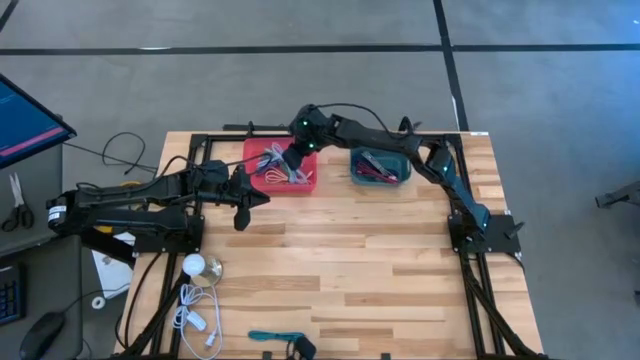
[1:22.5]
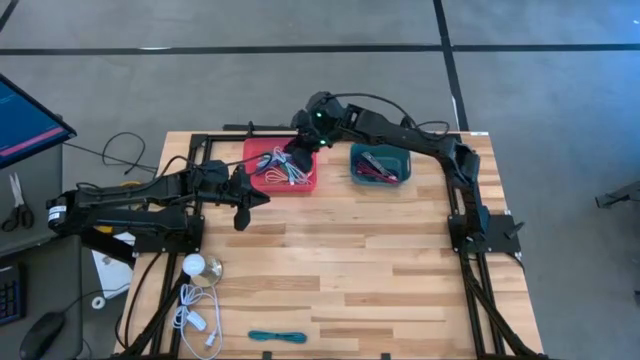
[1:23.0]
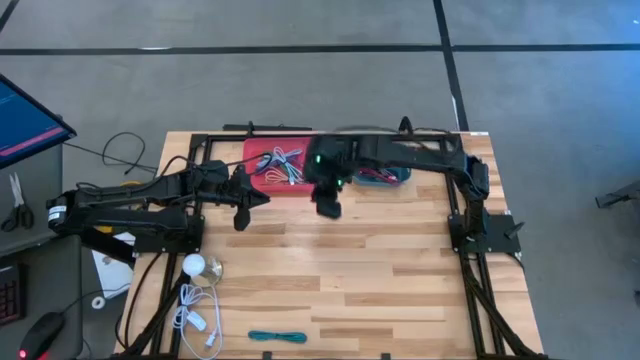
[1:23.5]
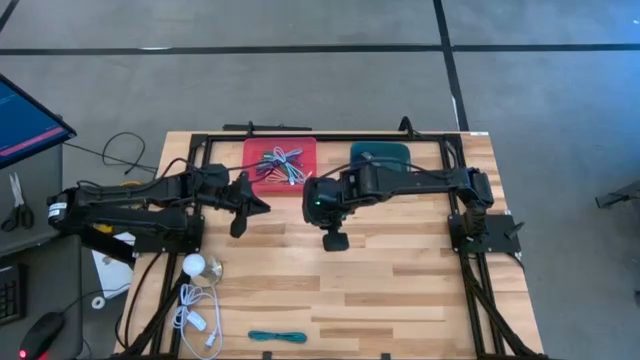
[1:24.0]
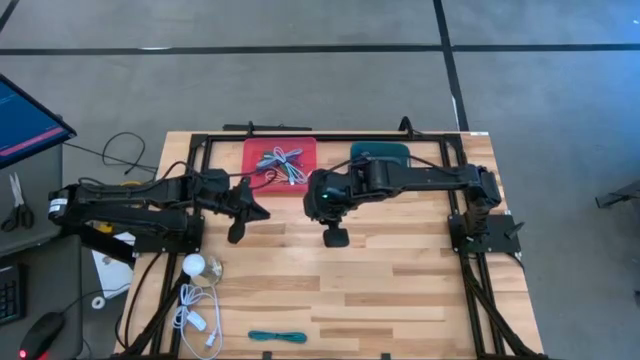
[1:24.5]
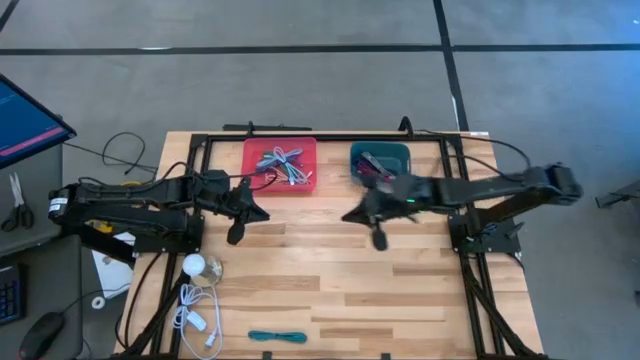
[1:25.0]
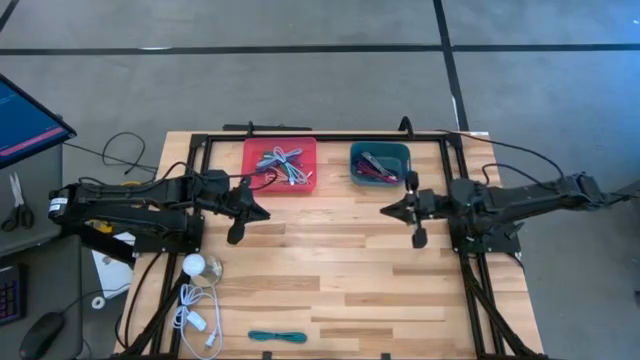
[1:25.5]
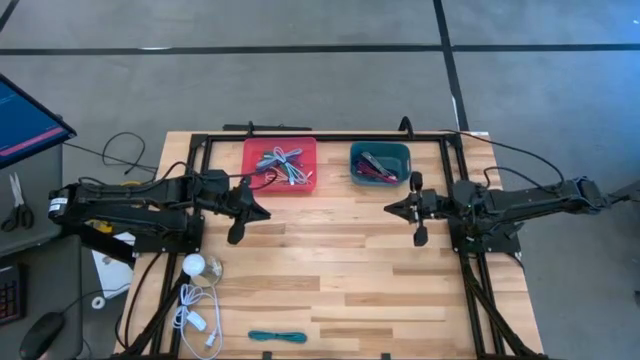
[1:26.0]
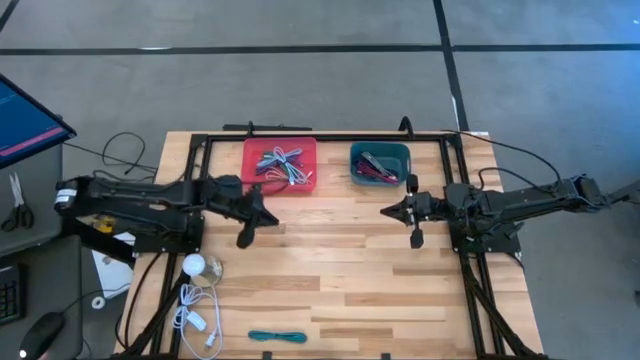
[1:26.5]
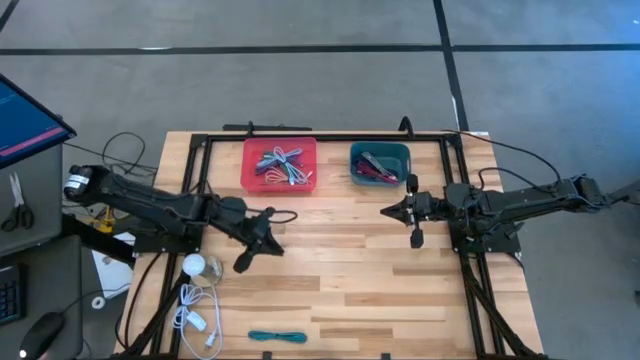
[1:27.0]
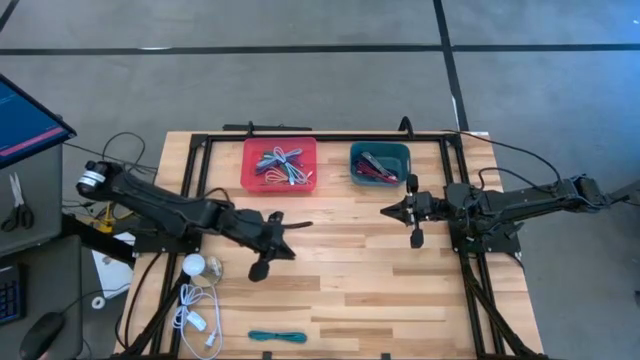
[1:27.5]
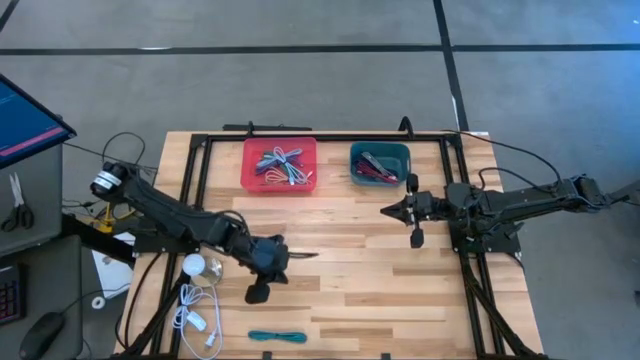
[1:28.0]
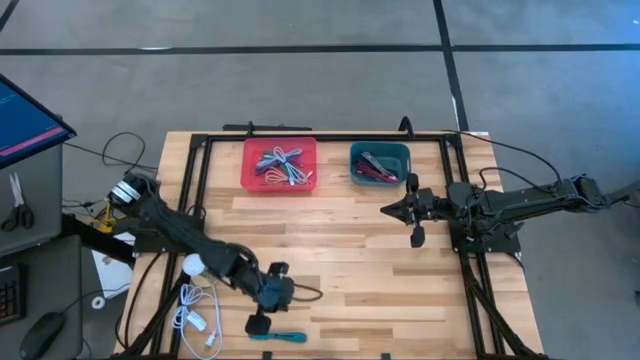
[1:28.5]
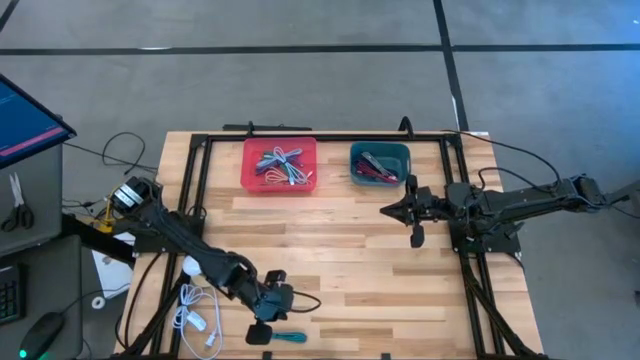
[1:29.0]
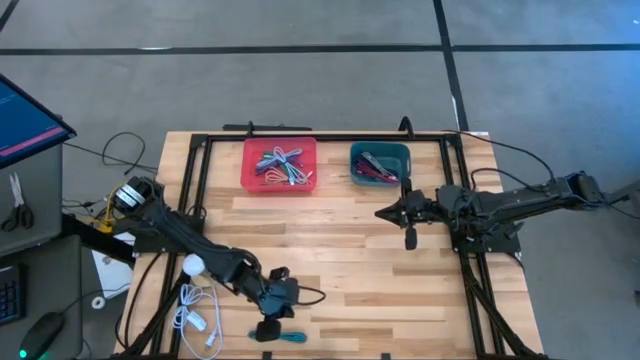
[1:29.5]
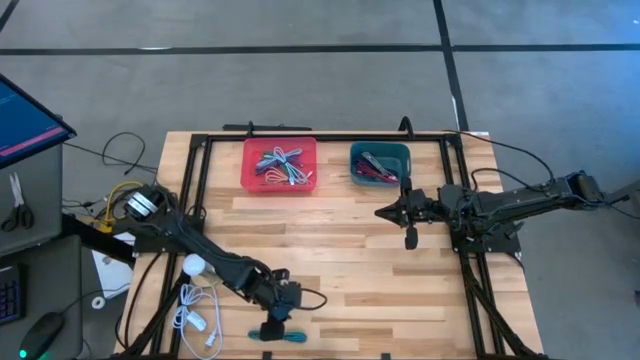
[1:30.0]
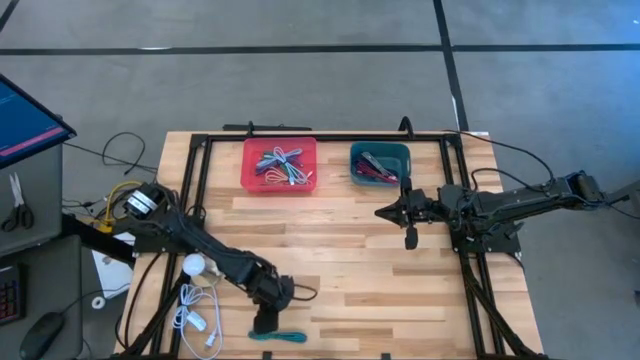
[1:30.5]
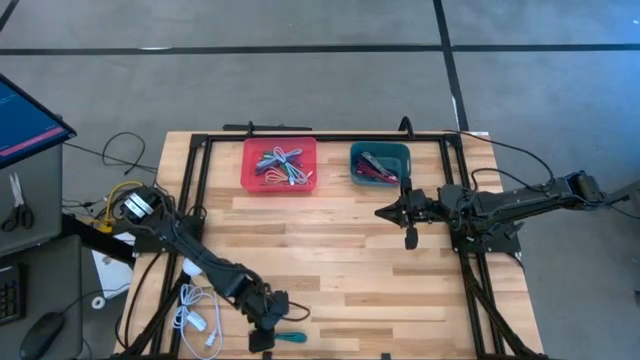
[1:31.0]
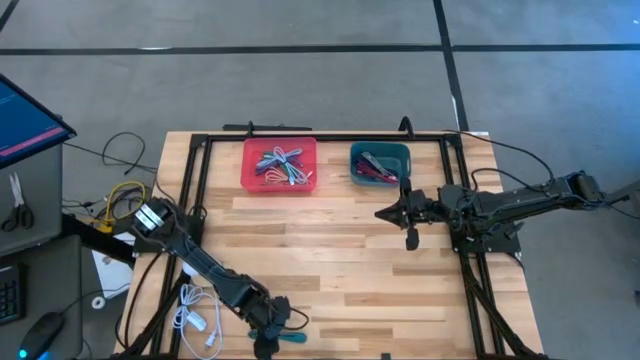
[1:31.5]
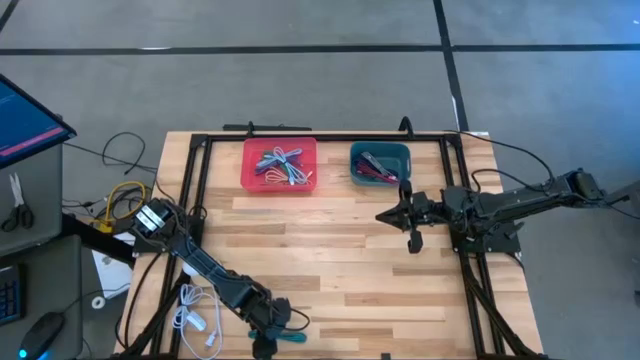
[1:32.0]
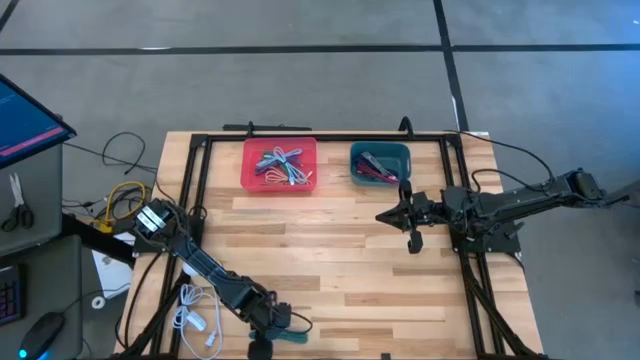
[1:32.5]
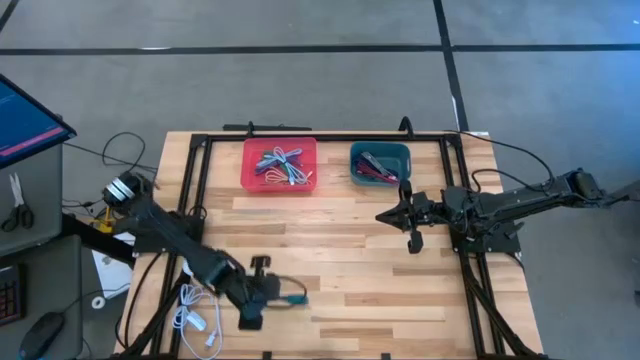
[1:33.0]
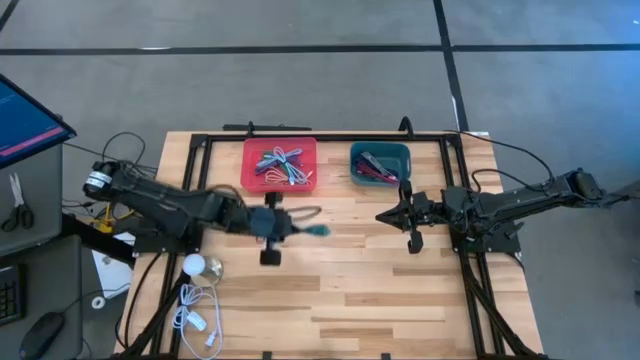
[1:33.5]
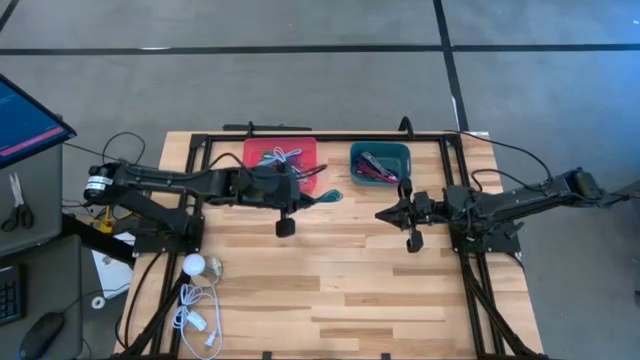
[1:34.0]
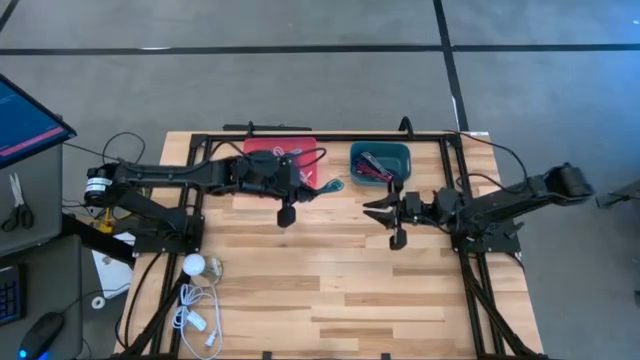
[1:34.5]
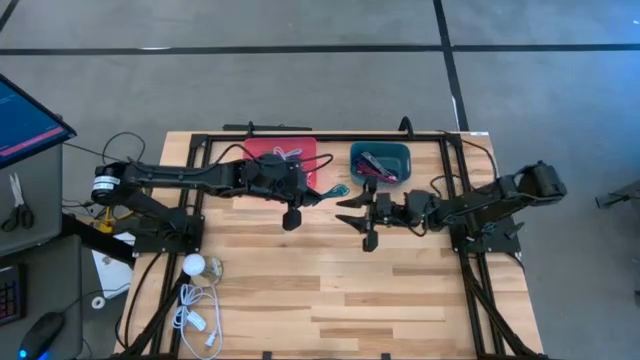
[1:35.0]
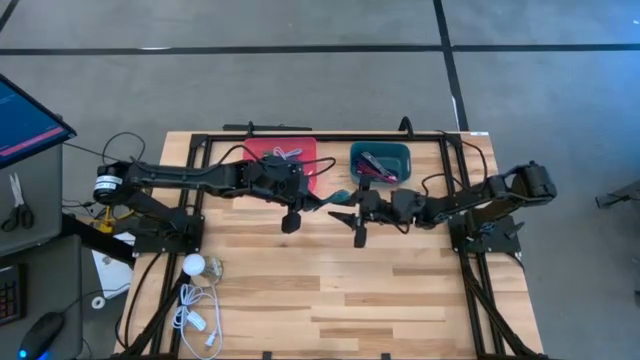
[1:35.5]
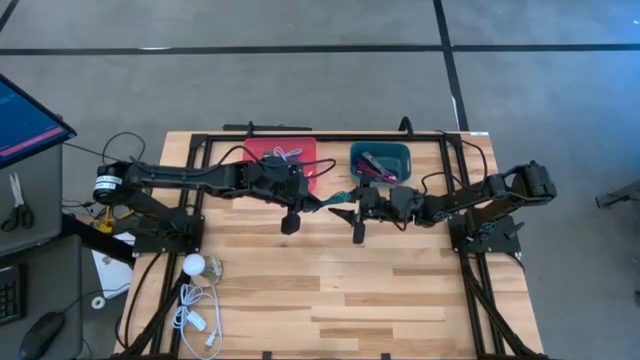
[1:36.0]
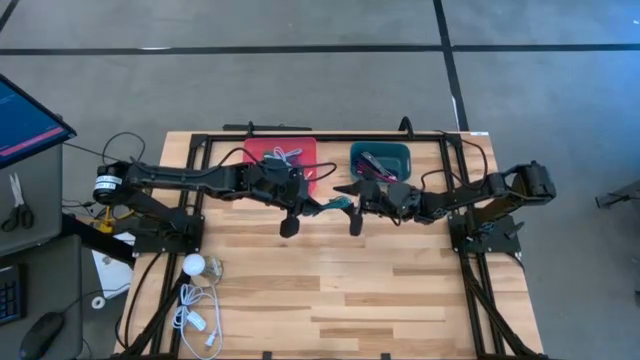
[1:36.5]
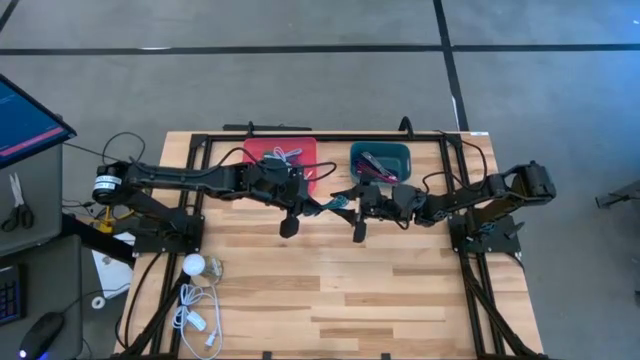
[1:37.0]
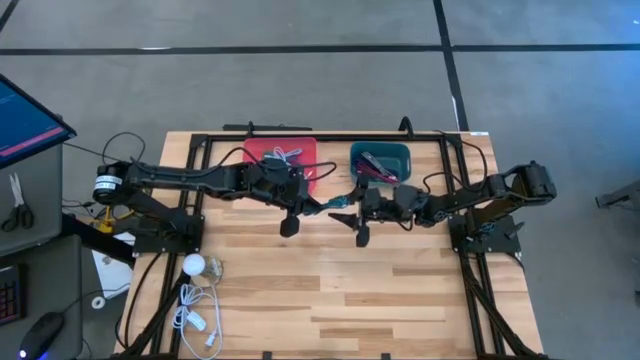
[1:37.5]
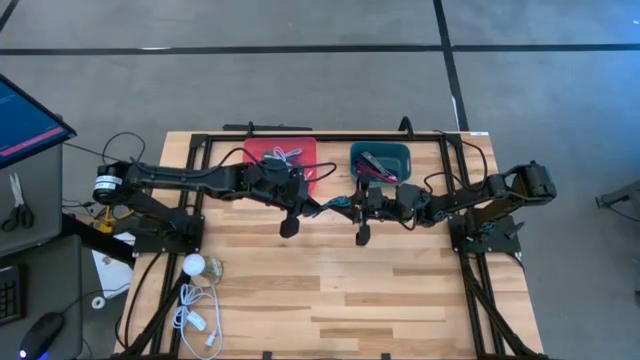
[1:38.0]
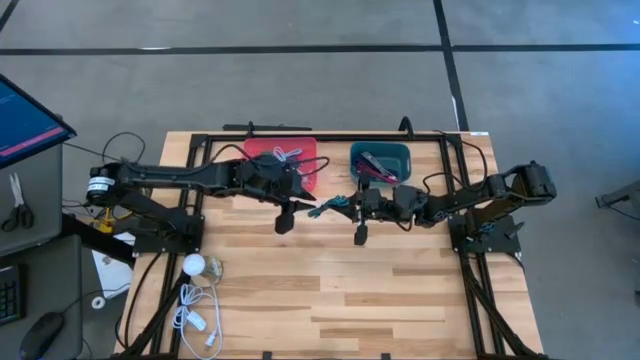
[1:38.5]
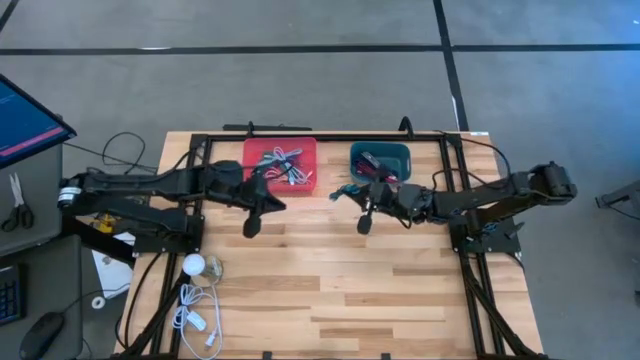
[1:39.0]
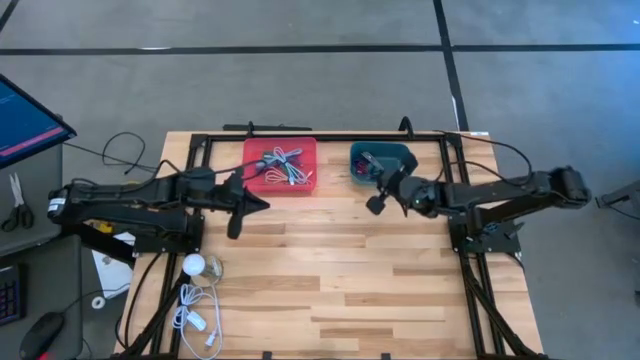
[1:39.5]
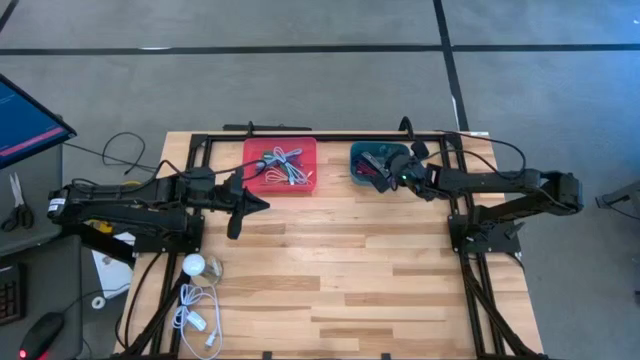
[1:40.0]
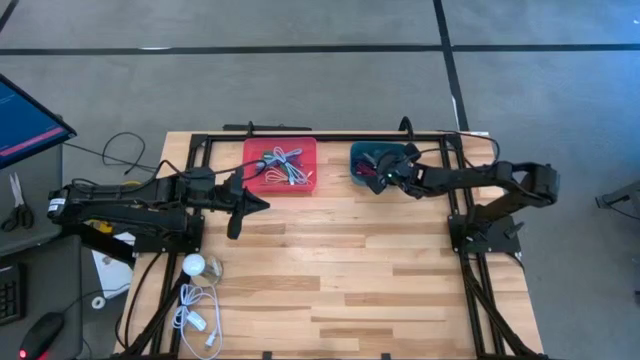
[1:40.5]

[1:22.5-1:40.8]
Task: Pick & Place USB Port
Put the black and light blue charger cable into the green bin

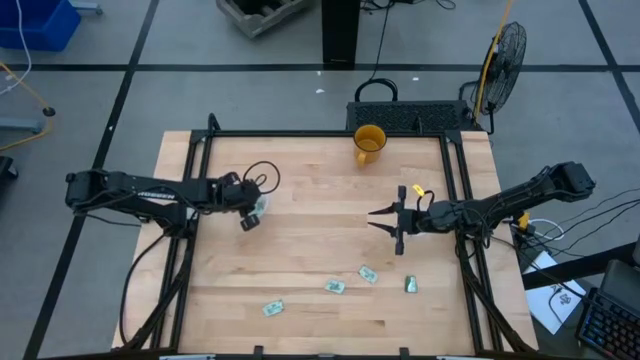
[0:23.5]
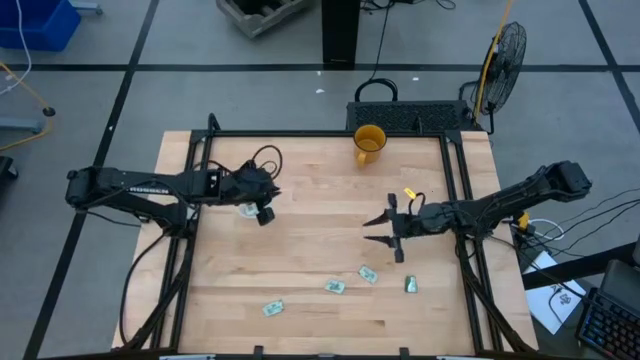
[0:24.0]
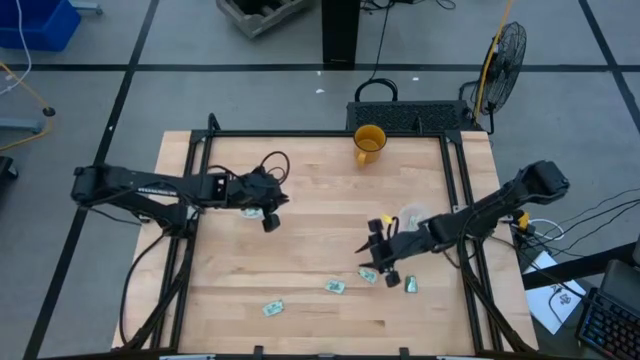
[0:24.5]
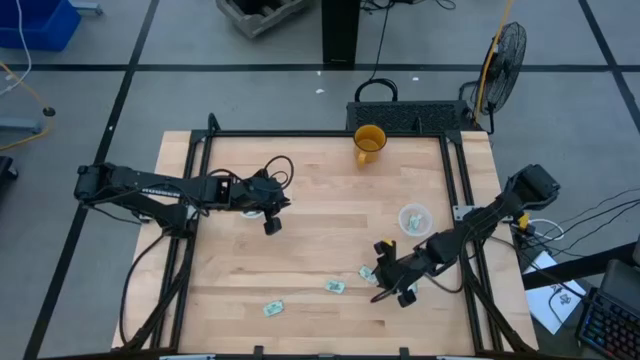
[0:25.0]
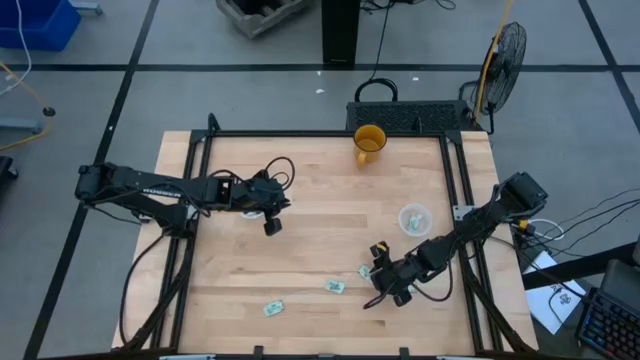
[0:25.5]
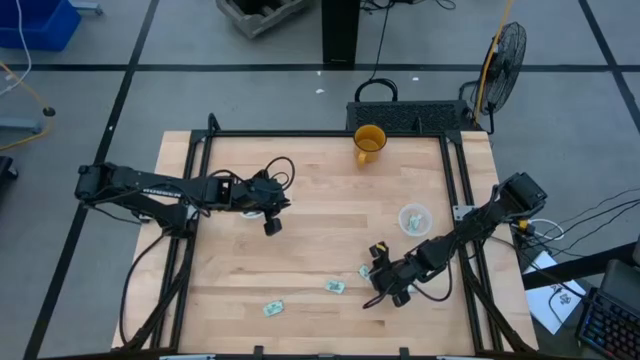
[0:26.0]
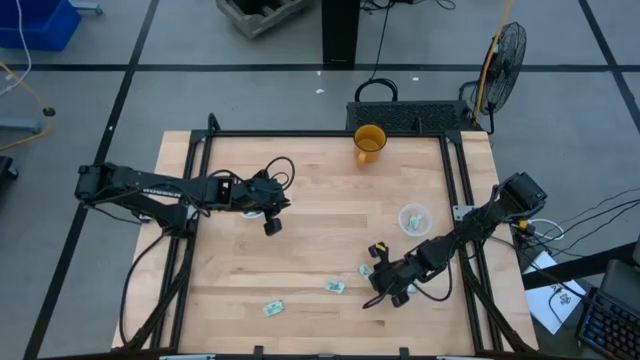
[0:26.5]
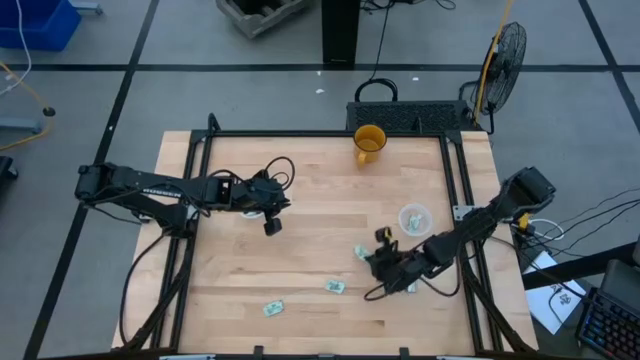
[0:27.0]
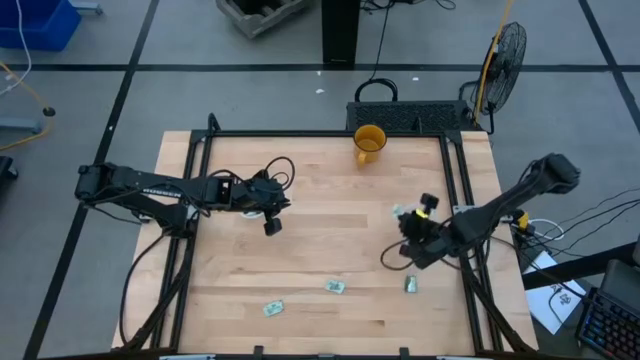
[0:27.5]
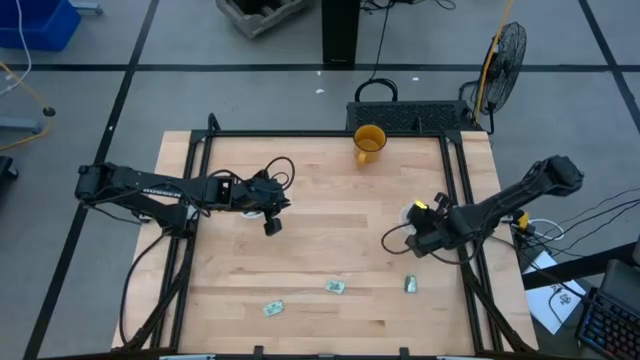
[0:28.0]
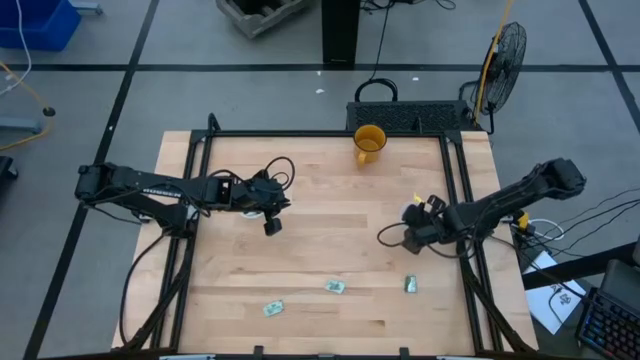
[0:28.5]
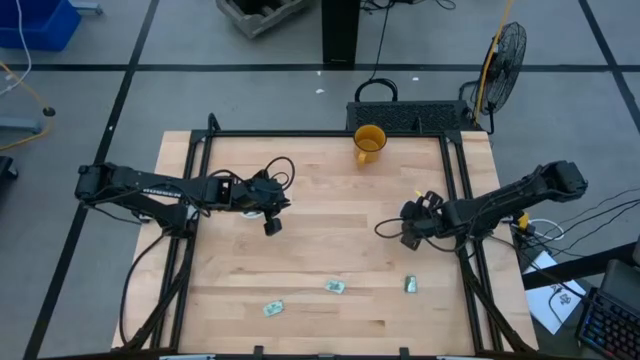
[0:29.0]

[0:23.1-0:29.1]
Task: Pick and place Stevia / Truvia into bins
Put the stevia packet into the right transparent container
